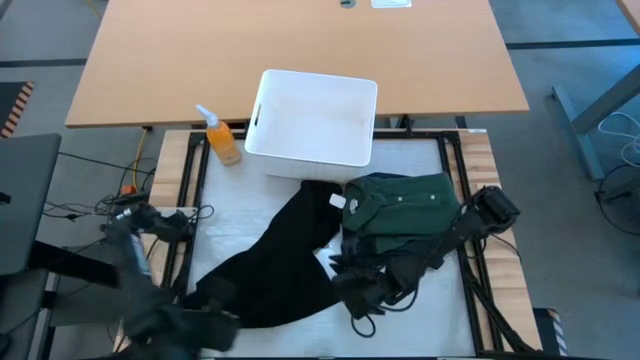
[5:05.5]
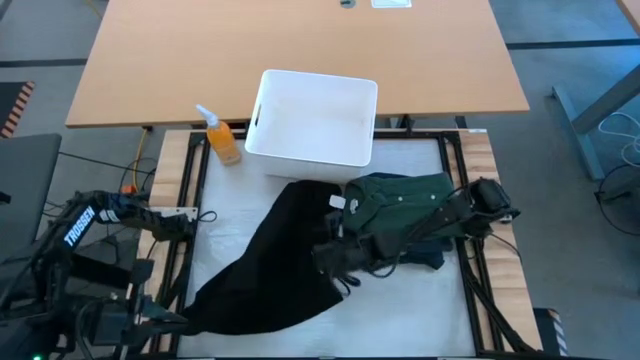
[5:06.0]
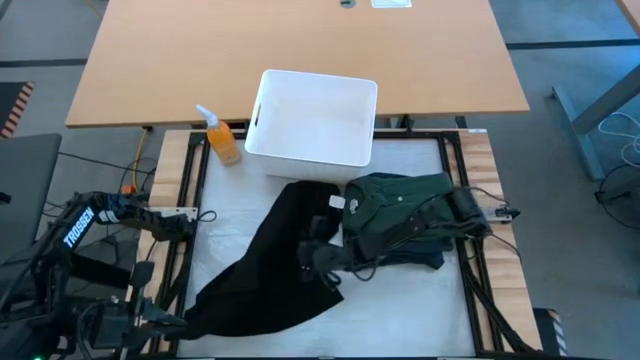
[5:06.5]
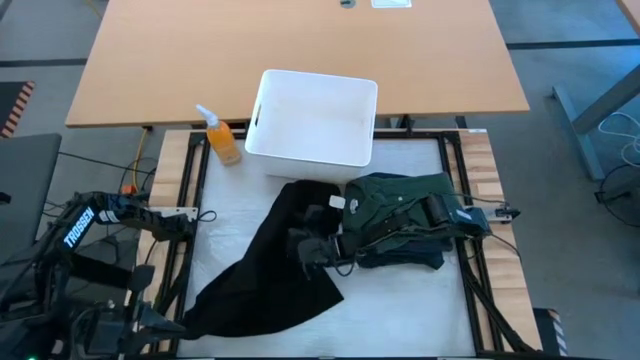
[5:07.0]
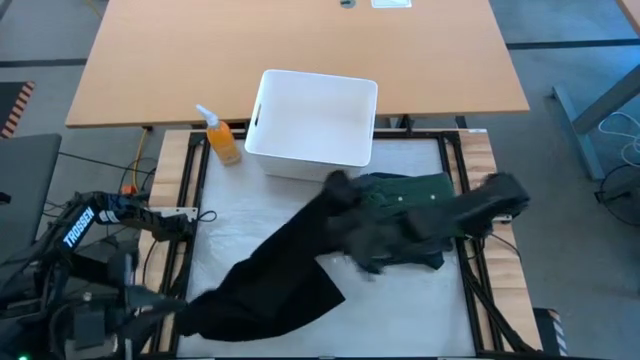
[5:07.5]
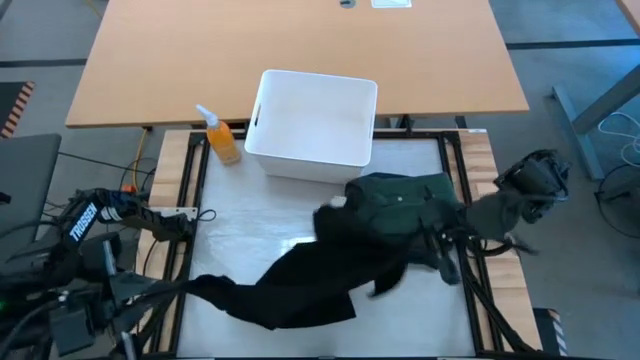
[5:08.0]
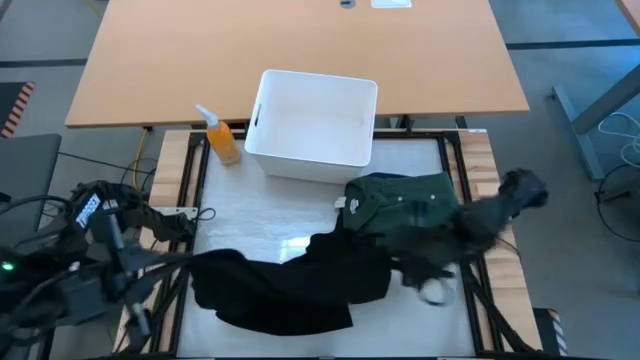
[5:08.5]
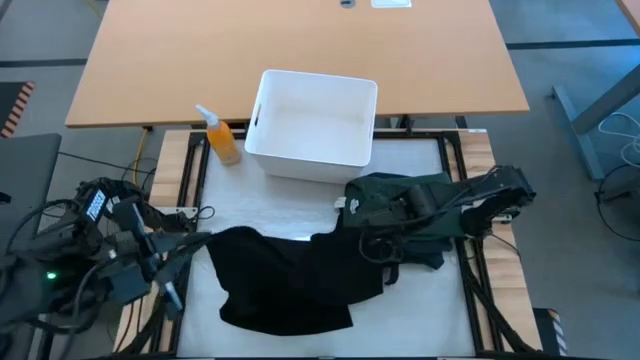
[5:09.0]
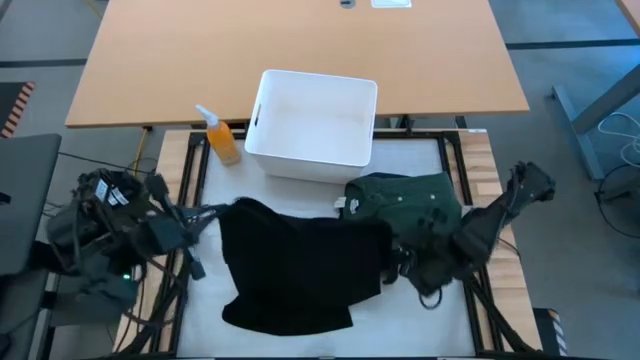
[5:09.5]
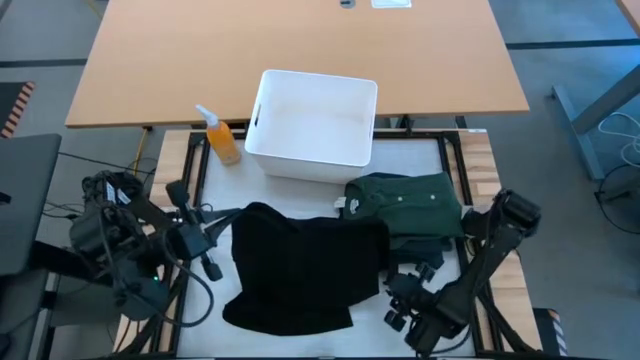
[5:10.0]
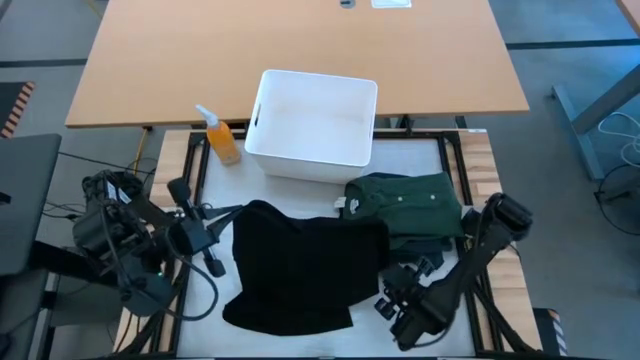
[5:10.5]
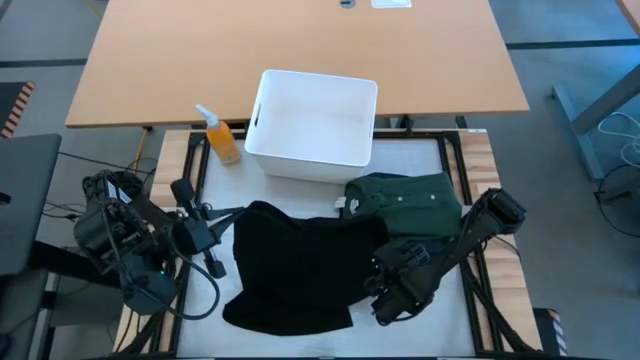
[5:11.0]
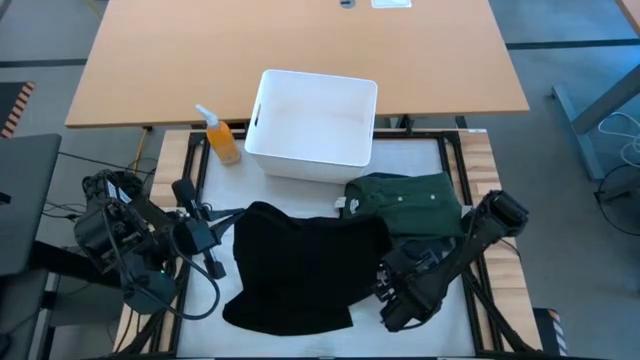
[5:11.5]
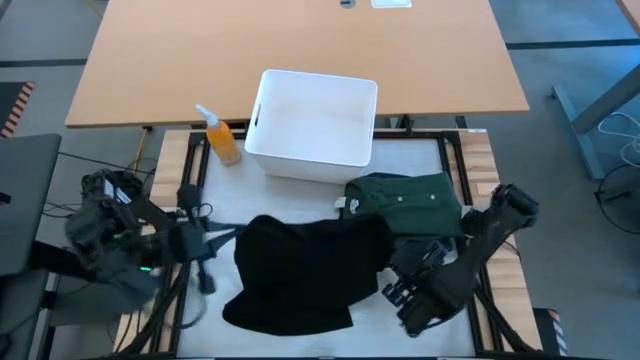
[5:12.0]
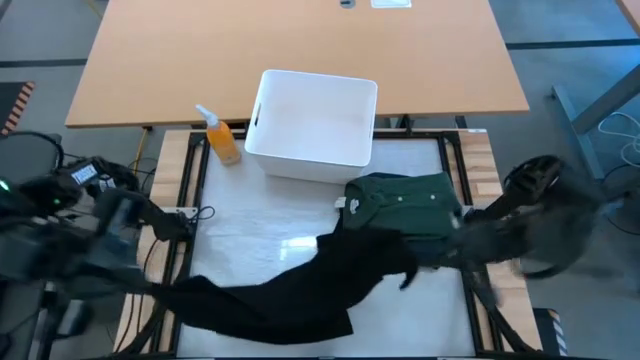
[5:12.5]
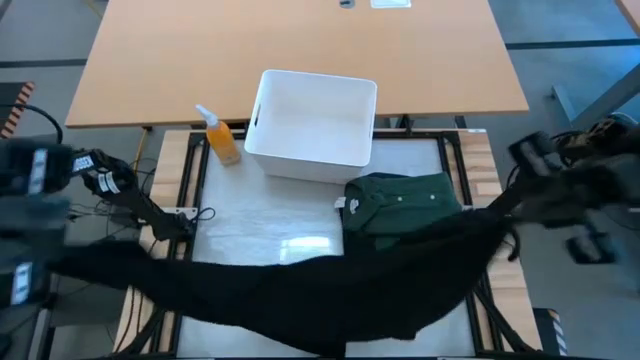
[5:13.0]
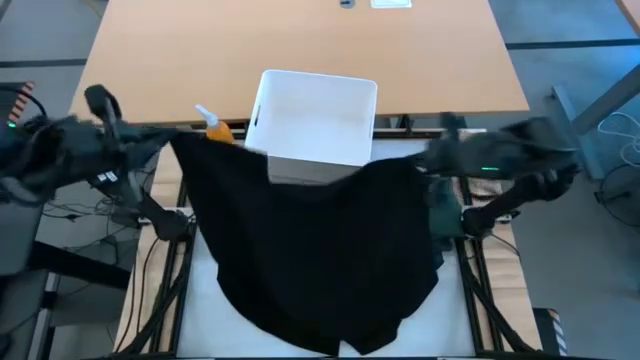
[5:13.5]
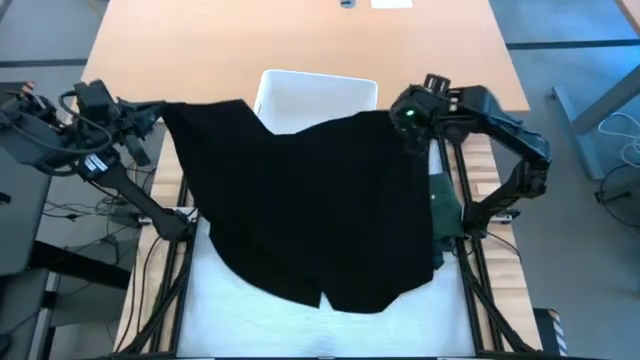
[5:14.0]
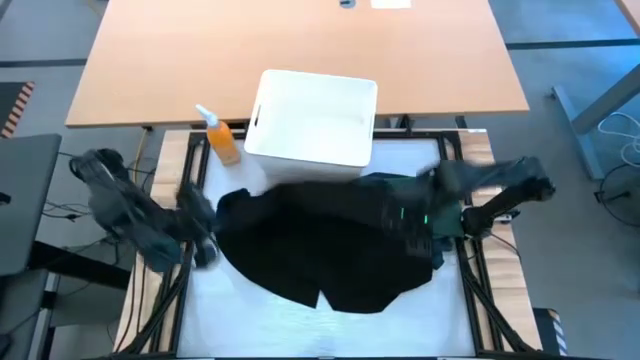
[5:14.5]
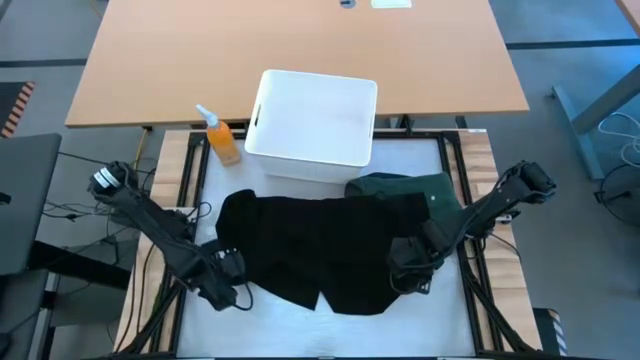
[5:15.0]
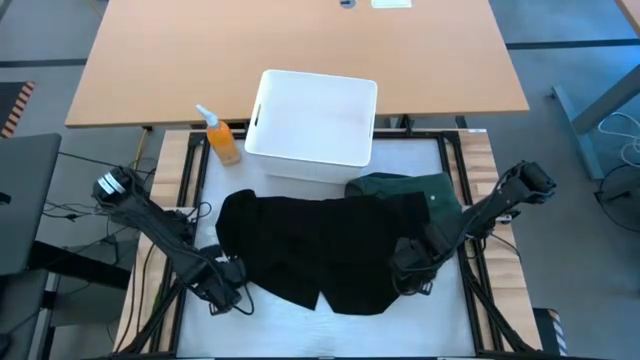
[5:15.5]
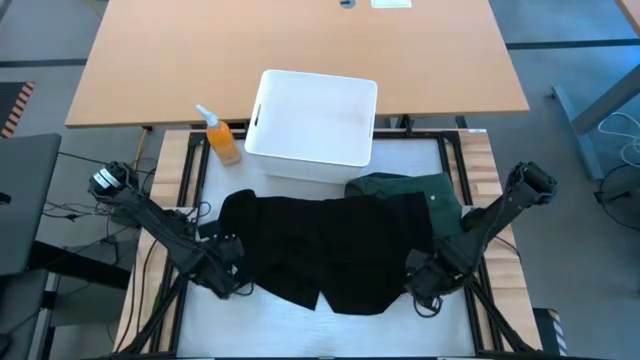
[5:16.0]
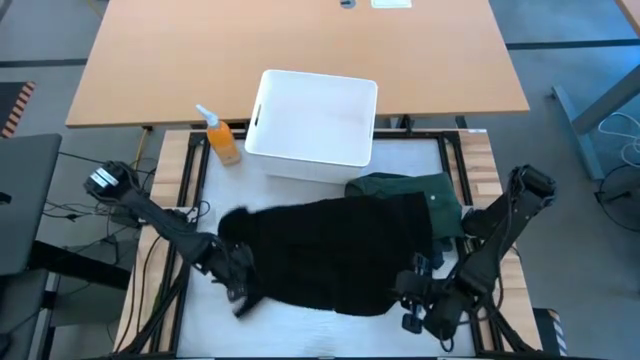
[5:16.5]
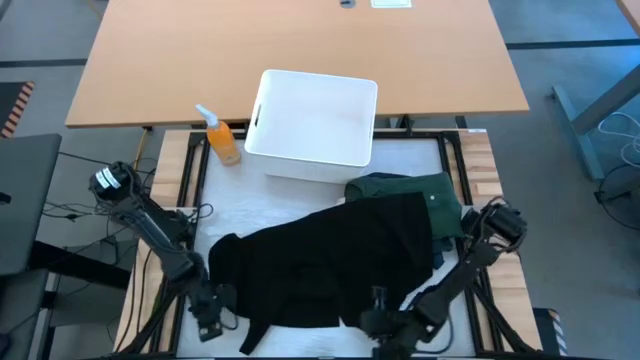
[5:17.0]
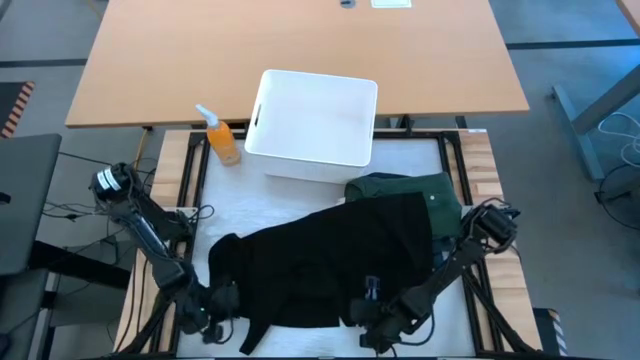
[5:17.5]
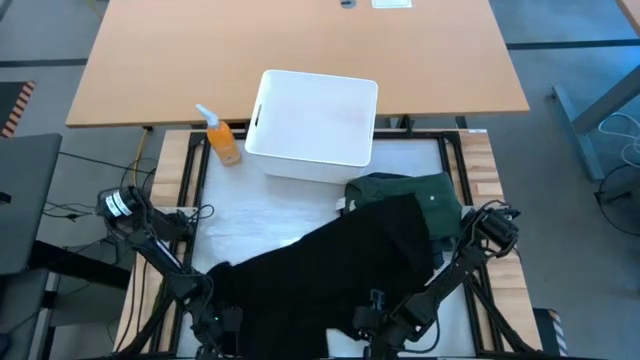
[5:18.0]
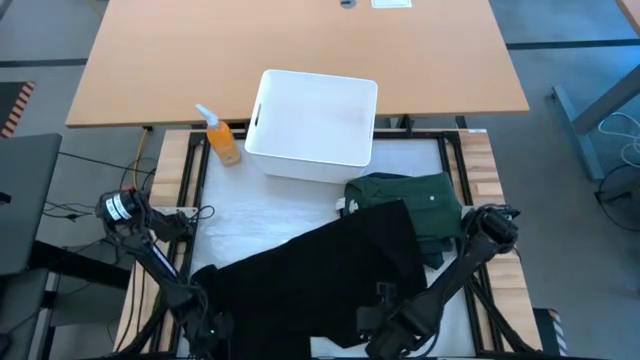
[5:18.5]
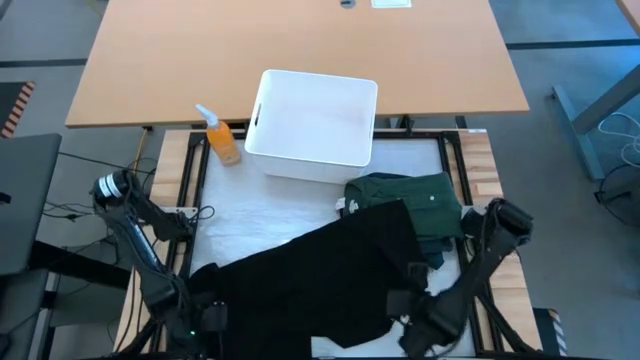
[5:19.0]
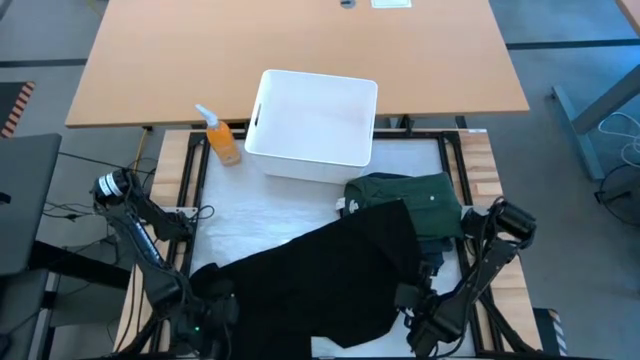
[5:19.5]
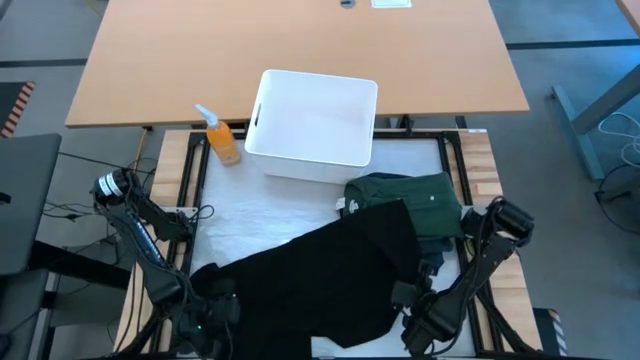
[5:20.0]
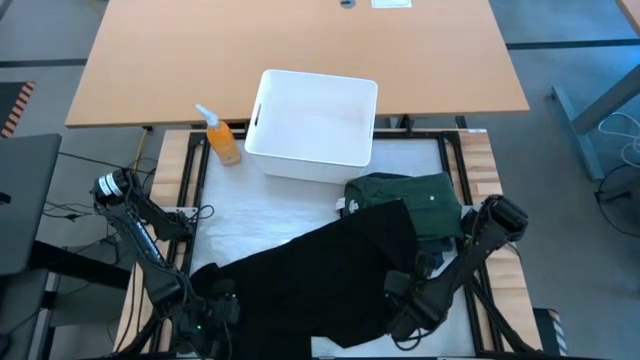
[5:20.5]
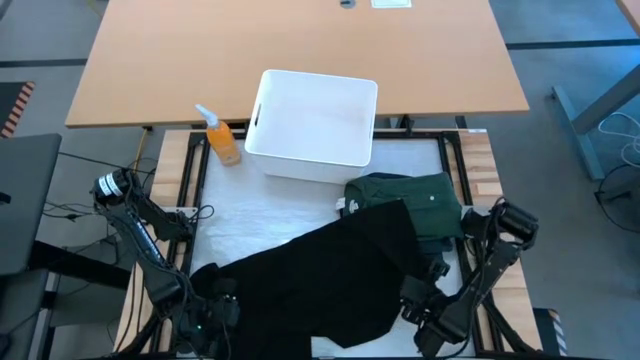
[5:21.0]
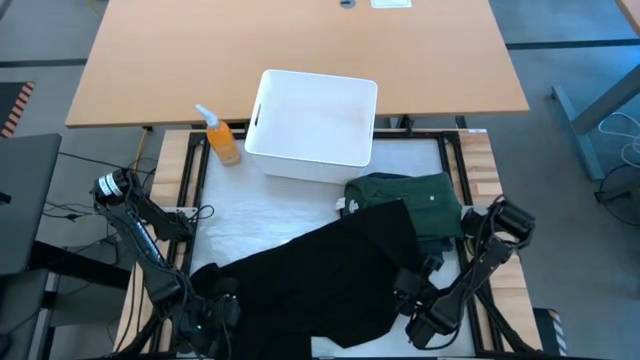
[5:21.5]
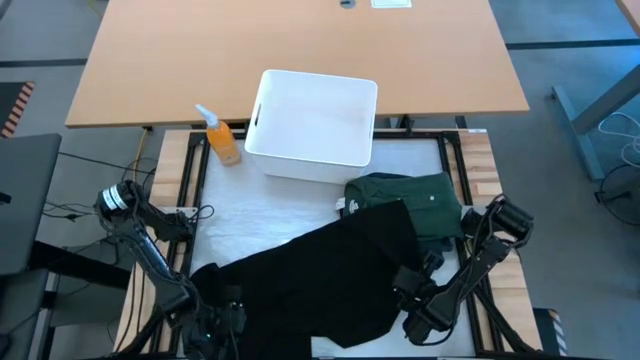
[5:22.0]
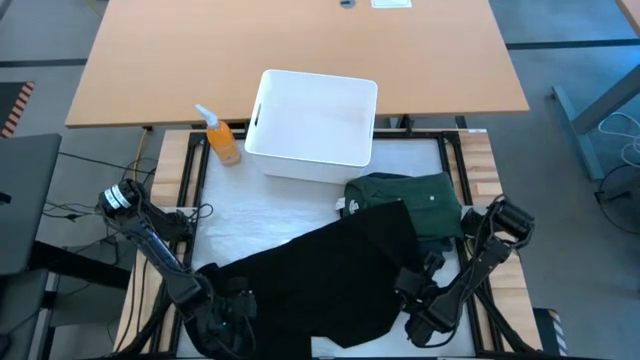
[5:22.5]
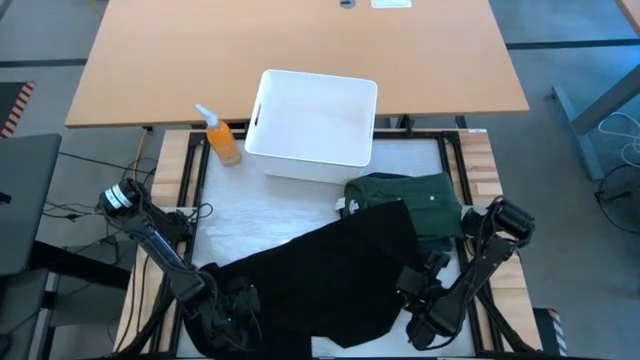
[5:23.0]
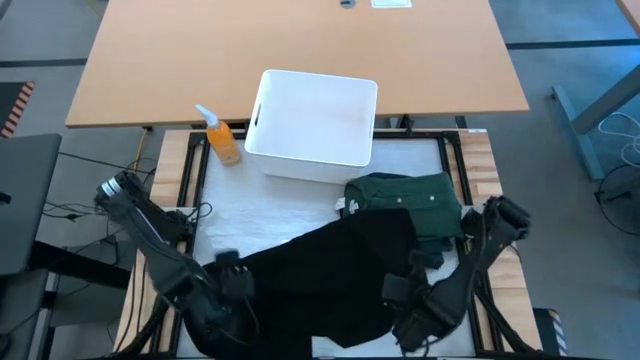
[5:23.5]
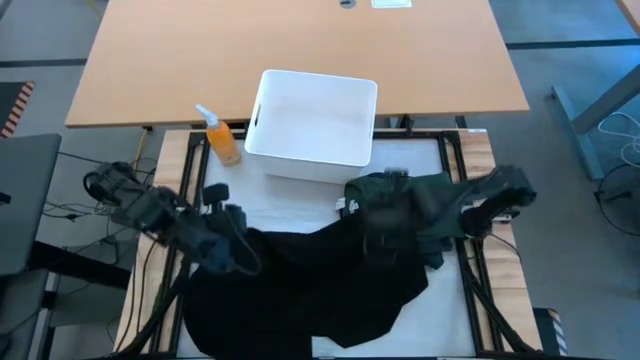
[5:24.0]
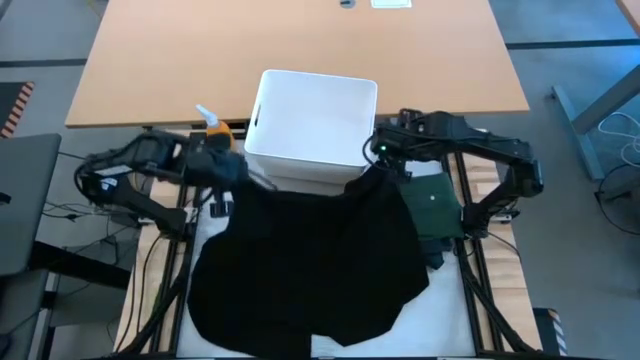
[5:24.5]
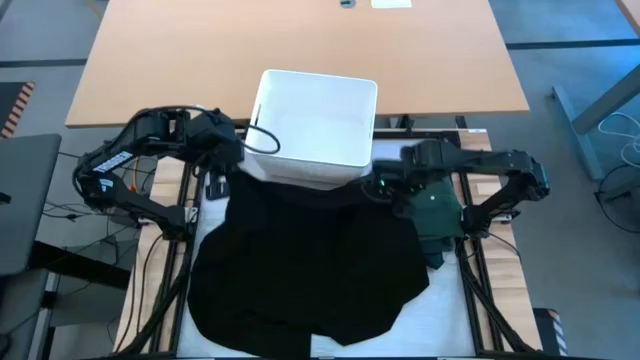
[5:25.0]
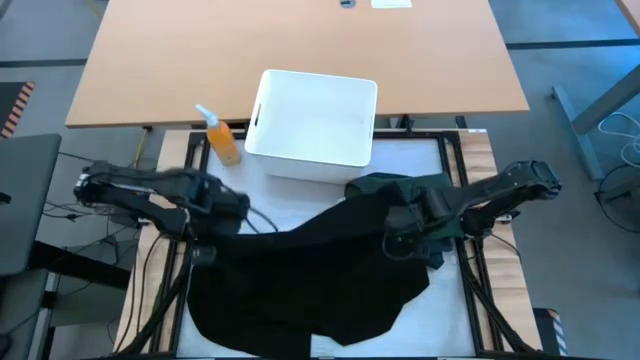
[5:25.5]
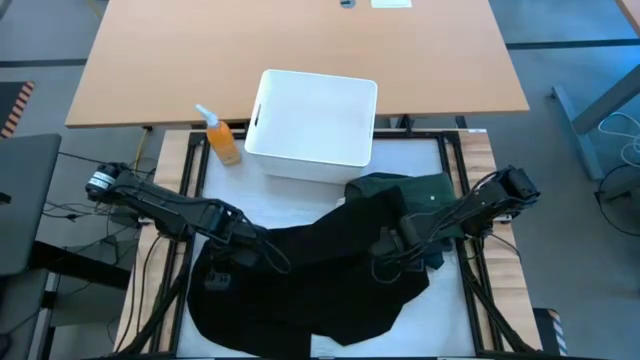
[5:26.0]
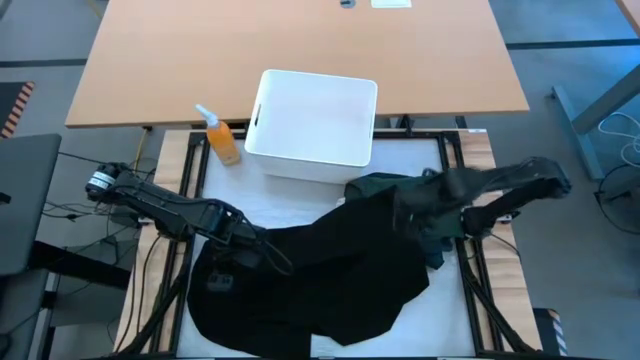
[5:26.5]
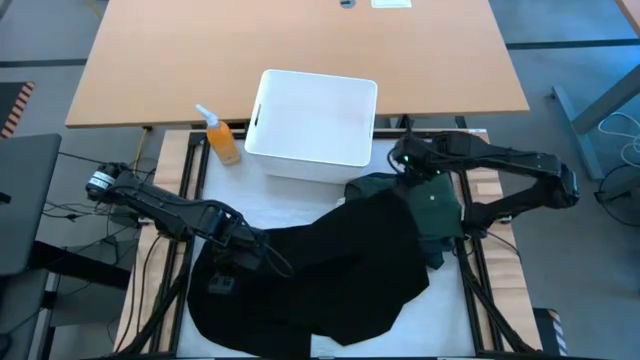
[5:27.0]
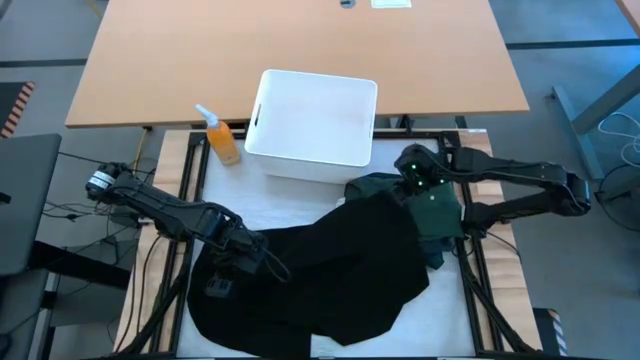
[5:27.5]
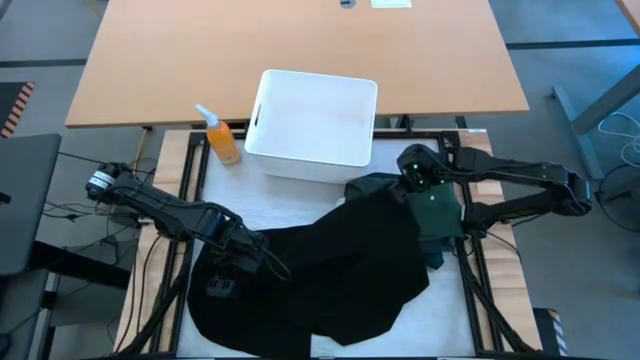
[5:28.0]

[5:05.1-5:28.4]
Task: Fold laundry
Fold the black shirt from the white laundry organizer
